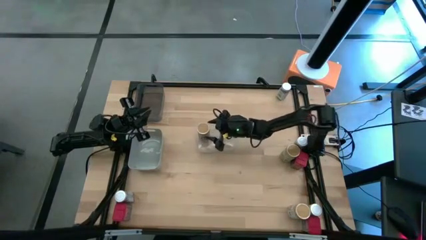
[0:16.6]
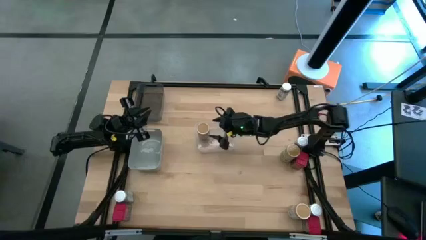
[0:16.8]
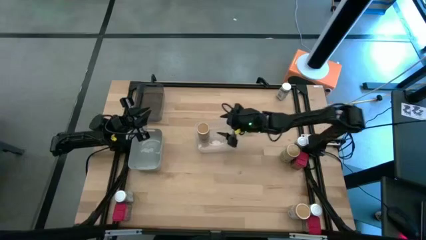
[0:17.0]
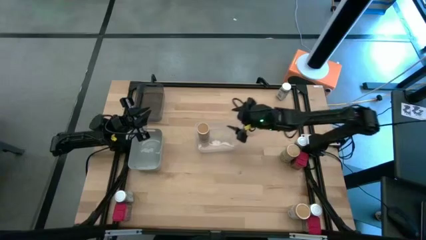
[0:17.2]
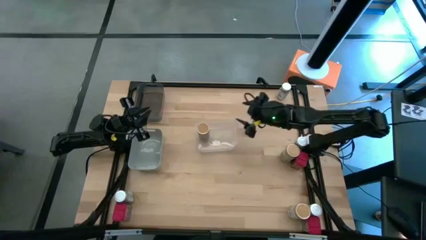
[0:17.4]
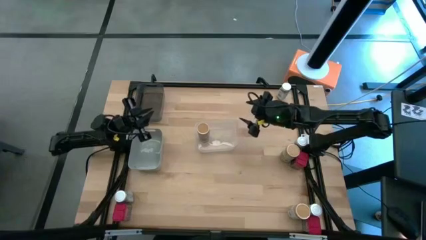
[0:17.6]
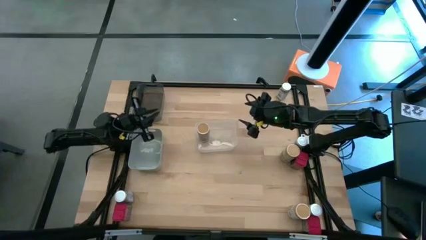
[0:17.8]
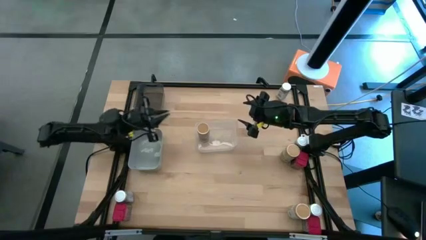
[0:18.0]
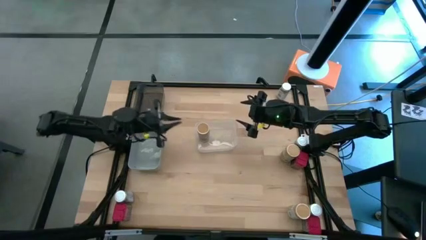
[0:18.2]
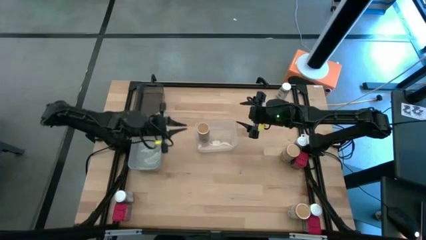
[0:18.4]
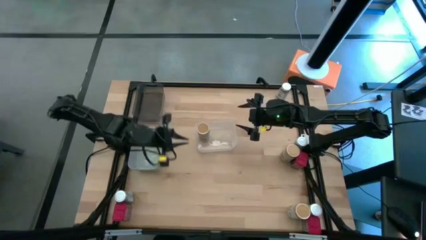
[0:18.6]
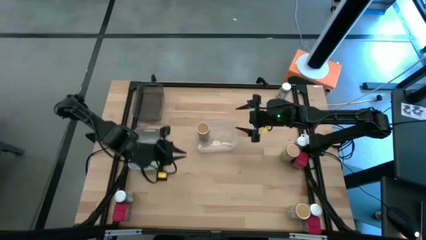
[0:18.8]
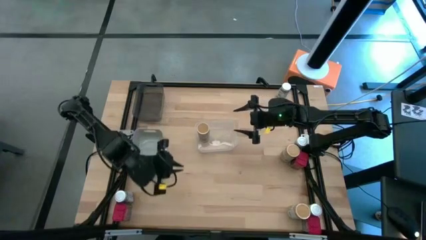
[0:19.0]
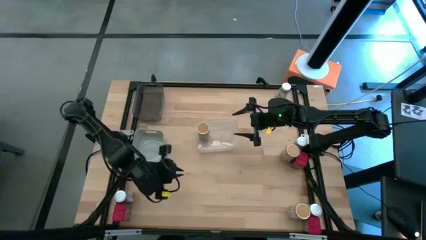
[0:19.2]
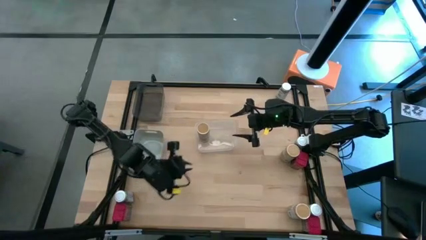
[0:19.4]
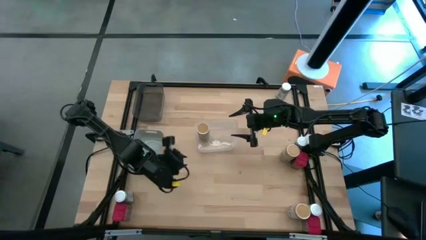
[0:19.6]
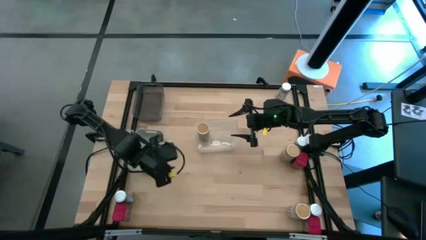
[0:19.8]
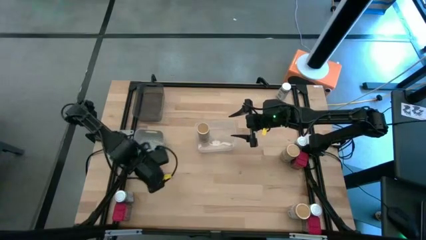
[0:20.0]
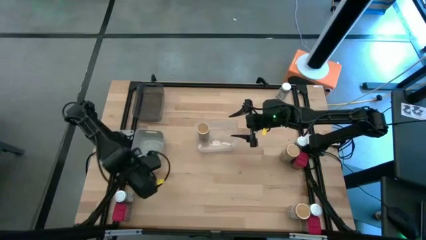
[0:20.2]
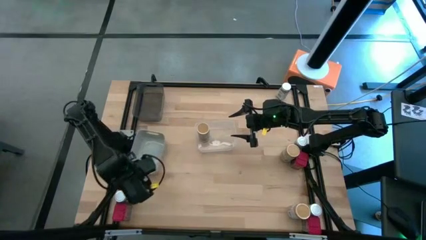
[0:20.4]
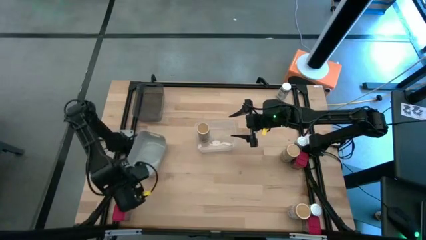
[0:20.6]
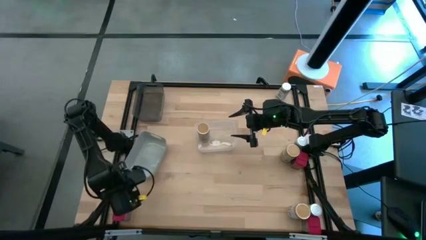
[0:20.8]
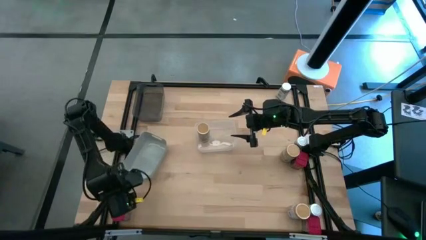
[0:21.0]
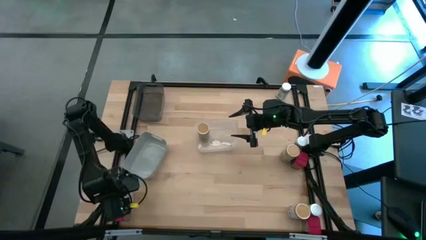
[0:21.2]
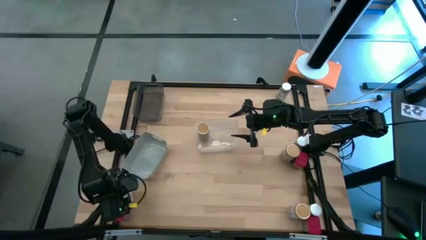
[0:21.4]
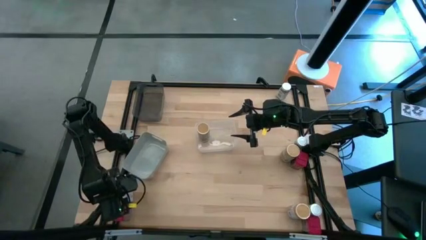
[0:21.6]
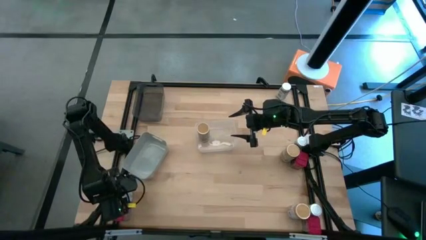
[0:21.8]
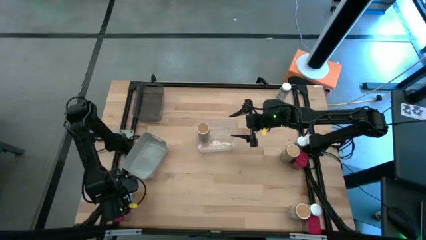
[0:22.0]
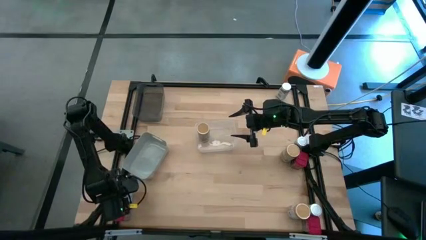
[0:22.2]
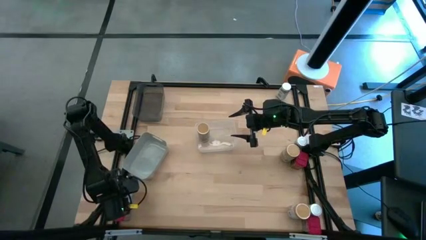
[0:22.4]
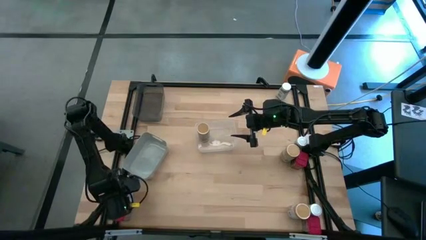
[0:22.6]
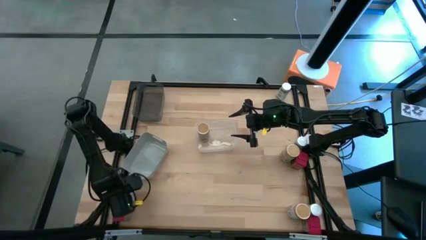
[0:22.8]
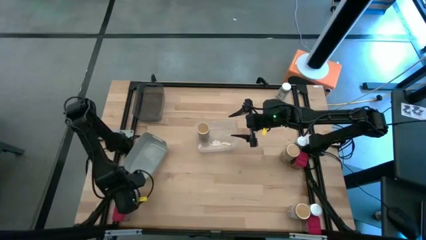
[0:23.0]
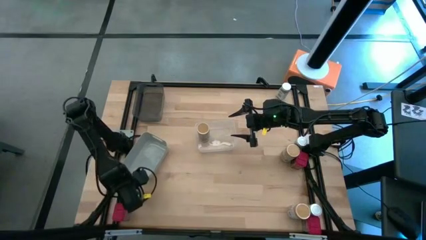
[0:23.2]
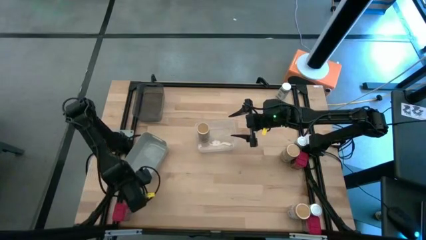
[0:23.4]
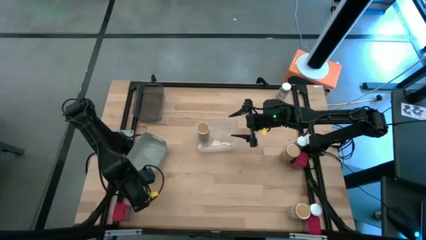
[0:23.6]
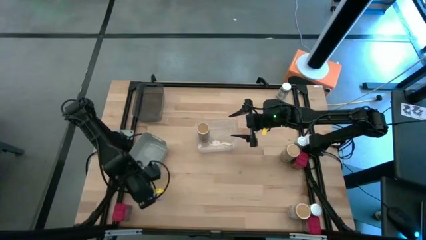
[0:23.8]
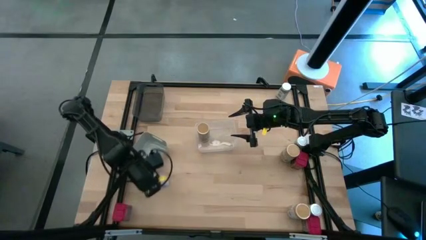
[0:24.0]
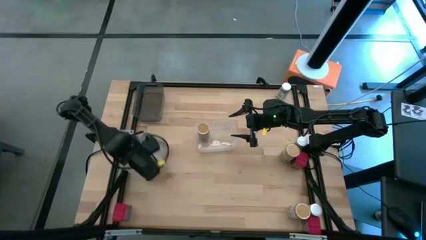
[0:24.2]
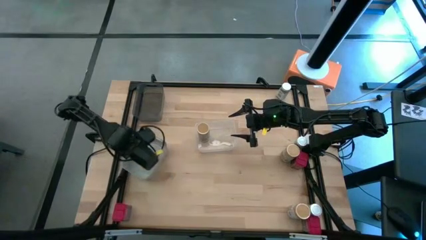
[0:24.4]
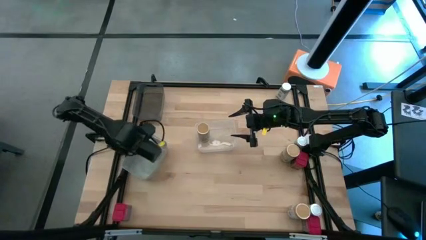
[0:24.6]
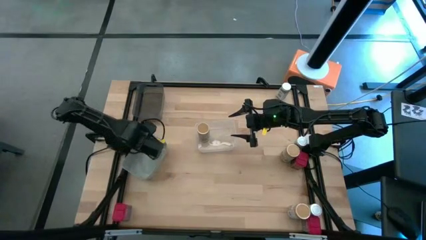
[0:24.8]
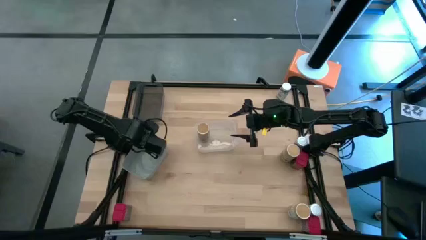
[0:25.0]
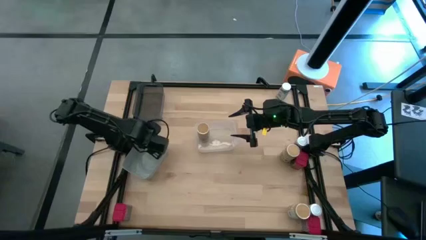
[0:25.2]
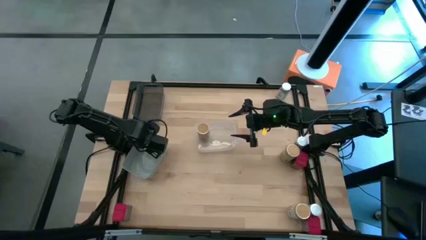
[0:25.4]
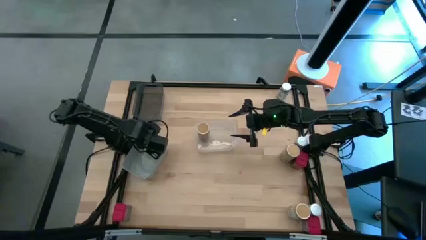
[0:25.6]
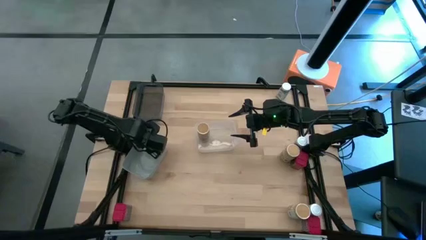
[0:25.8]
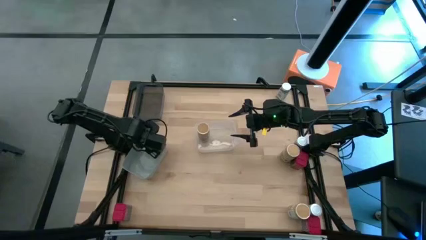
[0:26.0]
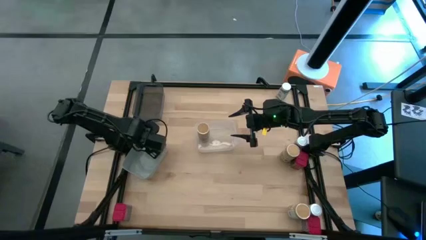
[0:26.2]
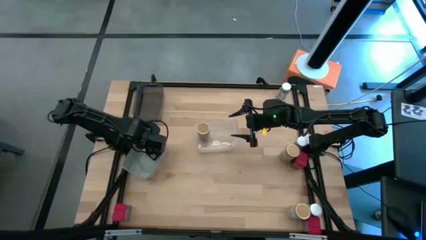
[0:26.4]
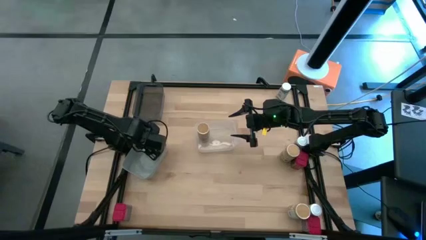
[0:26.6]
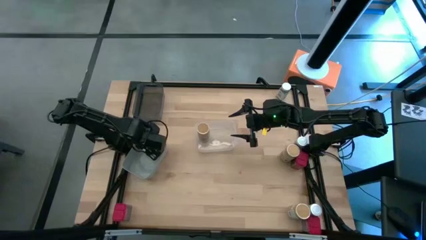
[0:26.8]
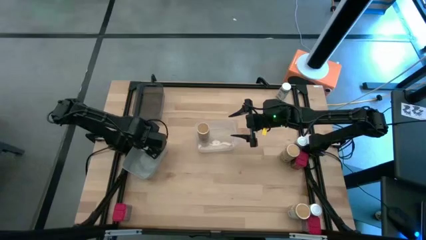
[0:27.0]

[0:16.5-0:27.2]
Task: Sort spices by type
Put the bottom left white seasoning bottle into the gray bin

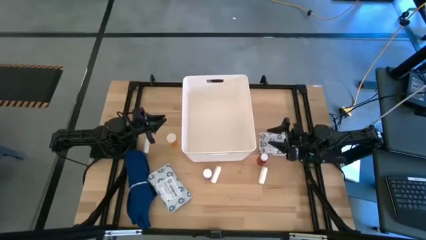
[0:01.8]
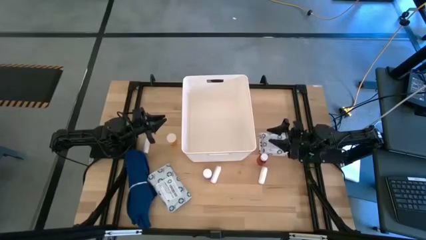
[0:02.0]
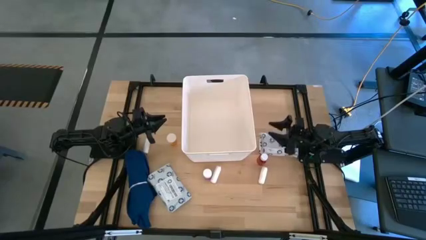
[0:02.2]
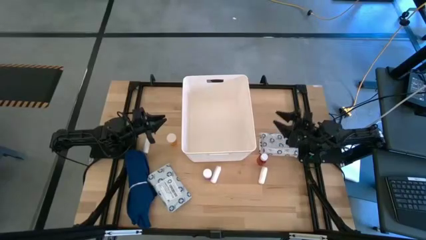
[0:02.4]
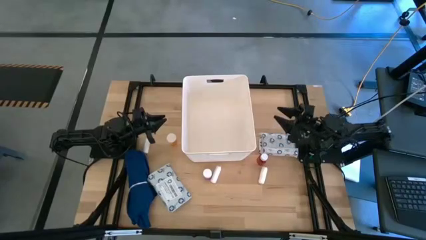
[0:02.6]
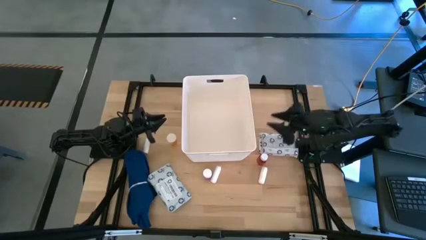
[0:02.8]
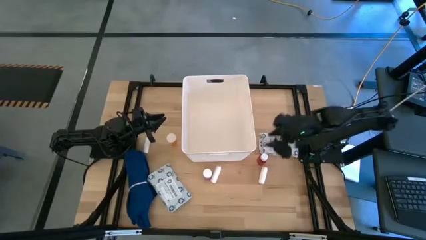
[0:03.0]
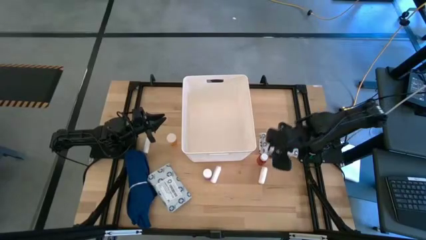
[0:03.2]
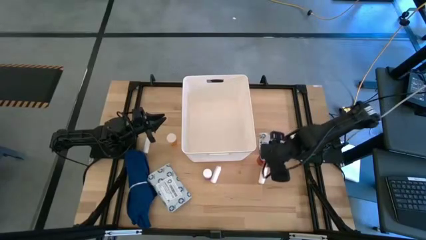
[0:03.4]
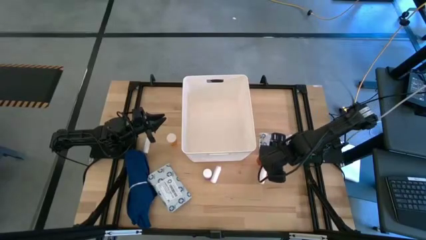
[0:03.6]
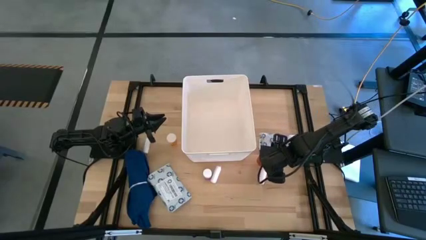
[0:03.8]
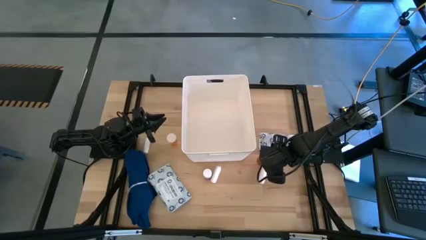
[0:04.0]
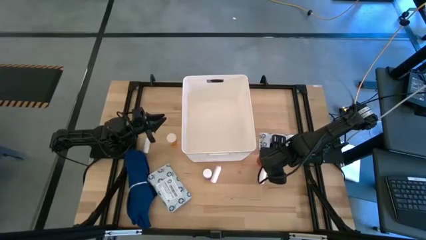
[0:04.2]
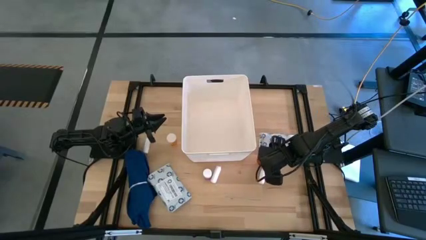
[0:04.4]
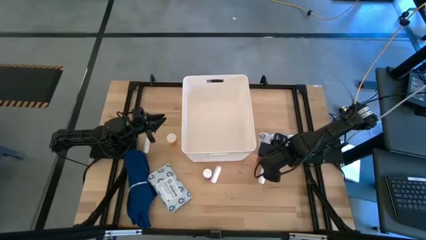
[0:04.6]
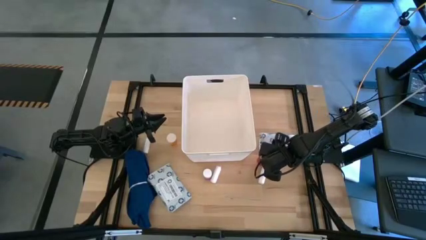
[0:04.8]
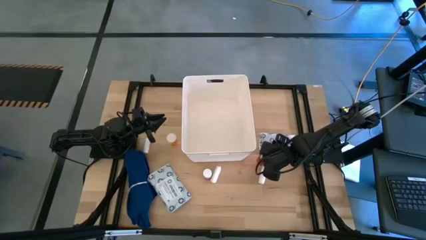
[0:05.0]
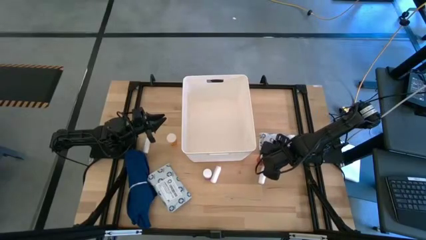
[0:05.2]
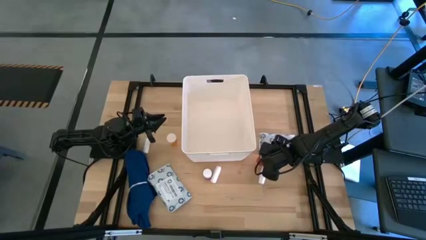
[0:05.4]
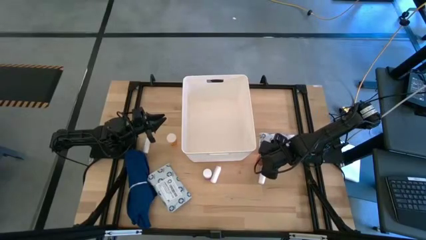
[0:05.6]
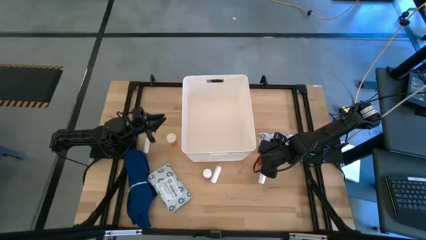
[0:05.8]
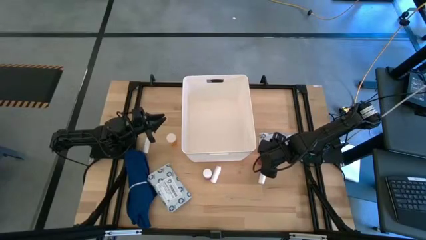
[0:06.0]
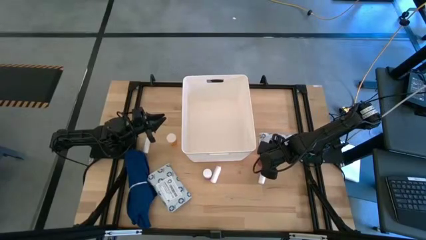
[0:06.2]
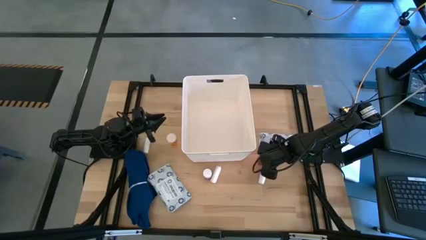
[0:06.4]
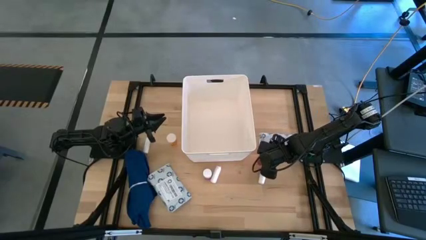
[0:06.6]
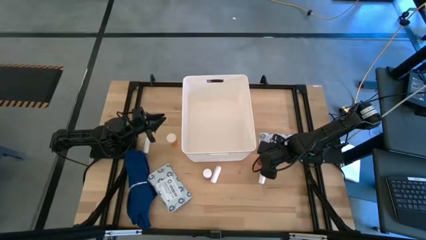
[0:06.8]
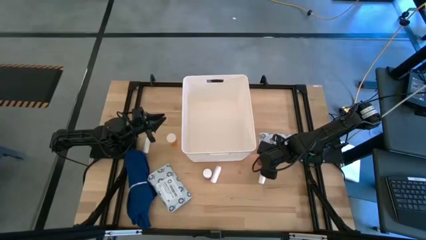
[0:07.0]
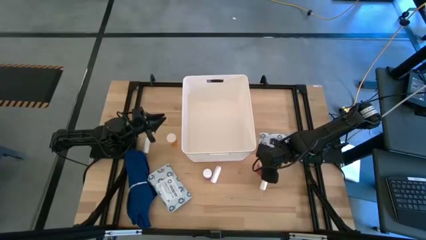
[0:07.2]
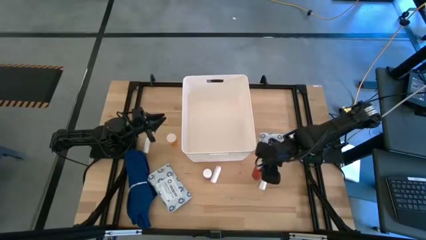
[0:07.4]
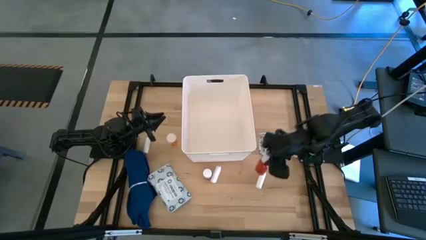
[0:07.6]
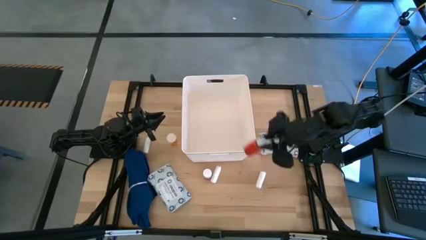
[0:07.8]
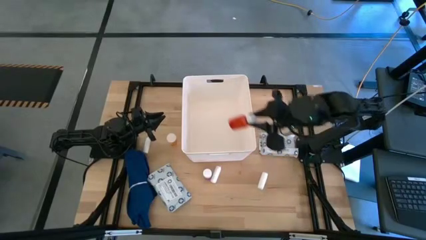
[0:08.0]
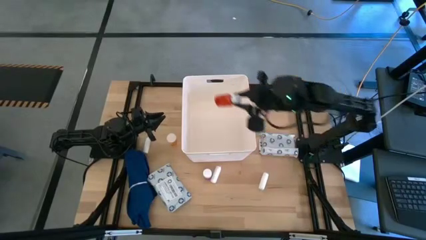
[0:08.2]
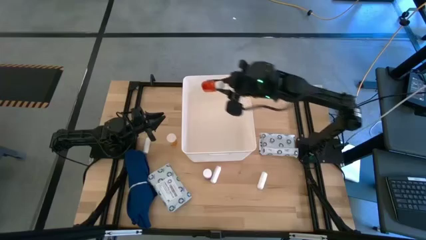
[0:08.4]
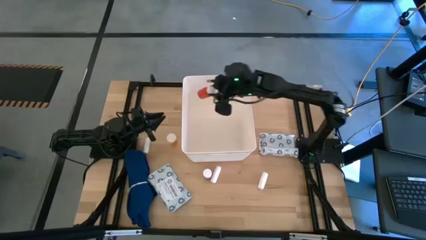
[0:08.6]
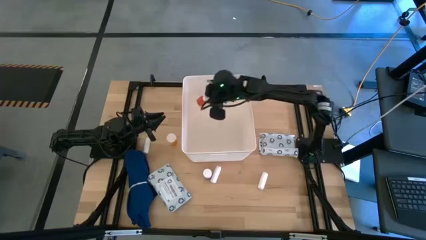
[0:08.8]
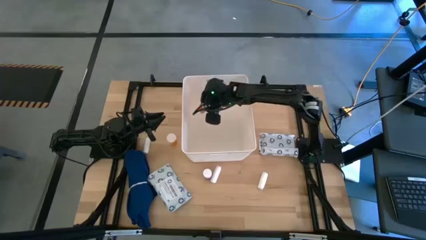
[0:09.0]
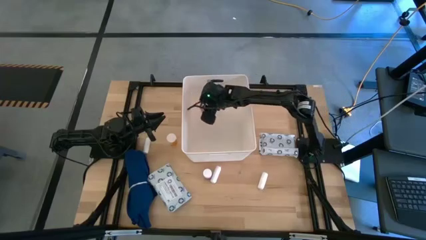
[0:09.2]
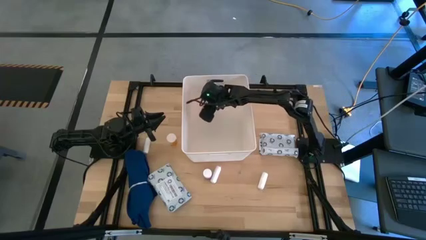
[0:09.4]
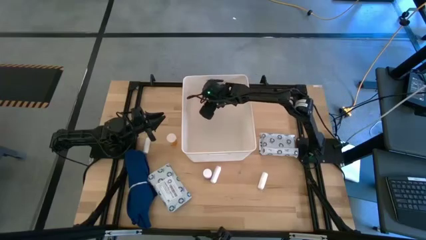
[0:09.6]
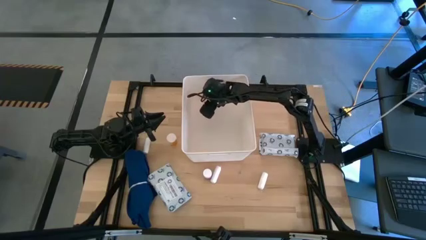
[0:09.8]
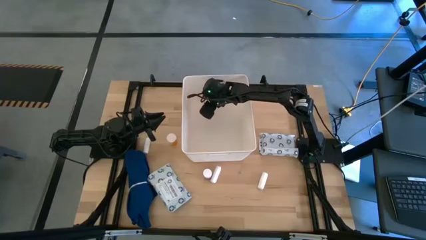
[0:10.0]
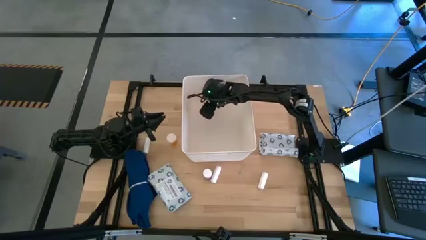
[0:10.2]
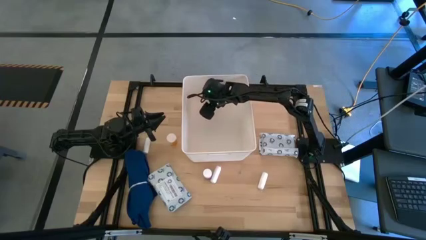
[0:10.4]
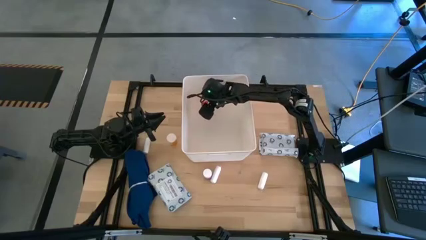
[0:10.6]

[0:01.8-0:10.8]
Task: Pick & place medical supplies in basket/bin
Put the transparent red bottle into the white bin
